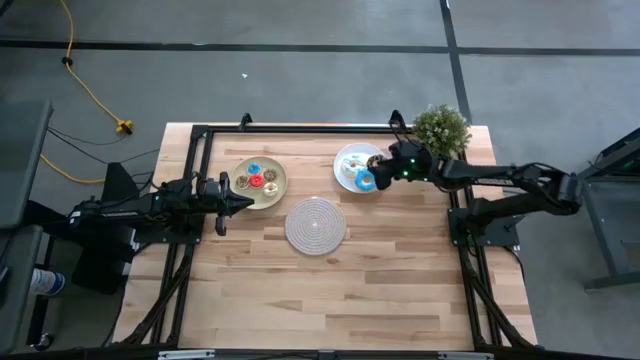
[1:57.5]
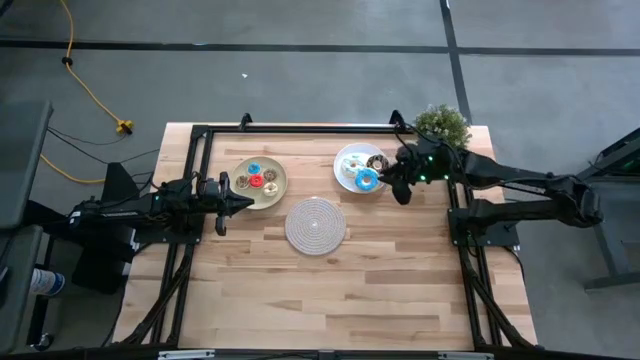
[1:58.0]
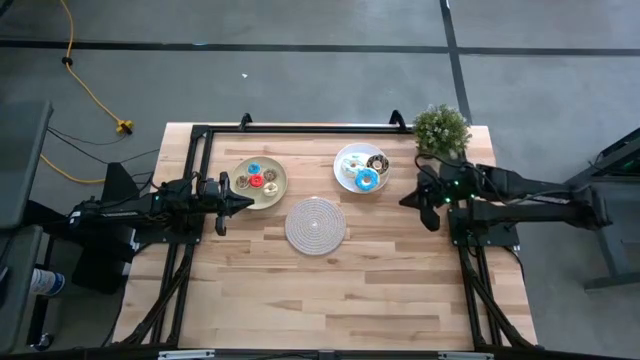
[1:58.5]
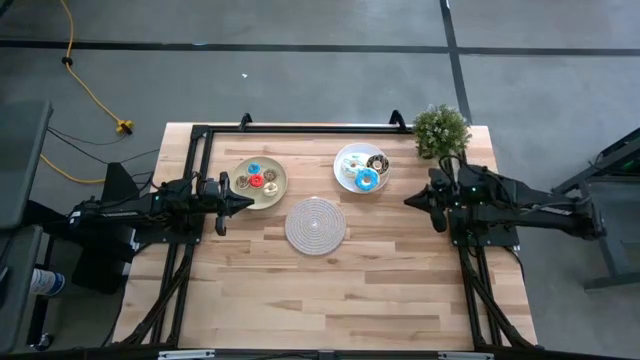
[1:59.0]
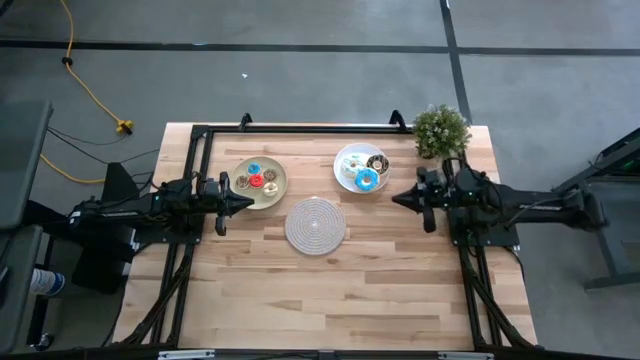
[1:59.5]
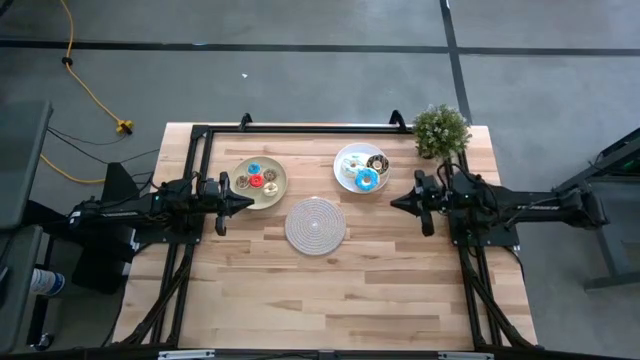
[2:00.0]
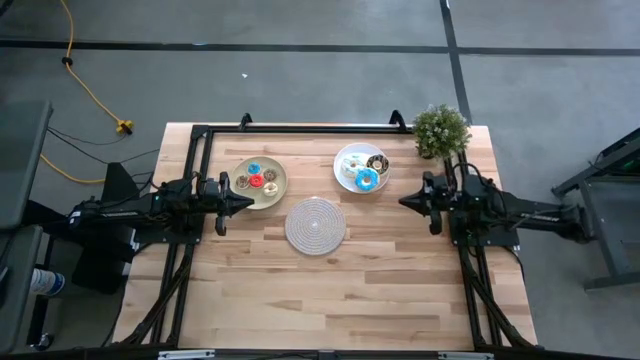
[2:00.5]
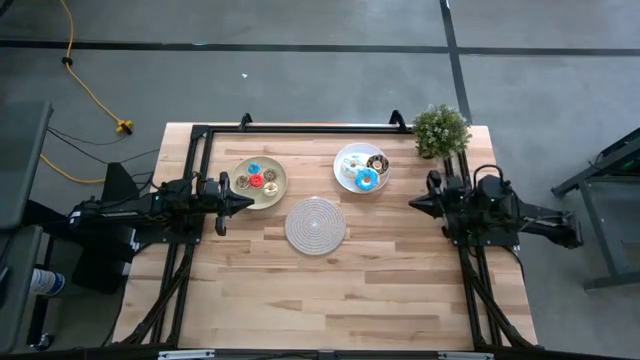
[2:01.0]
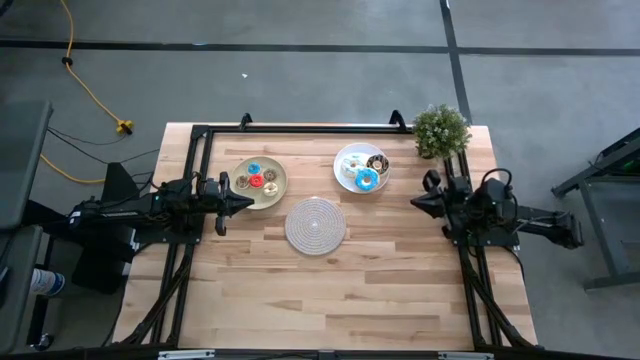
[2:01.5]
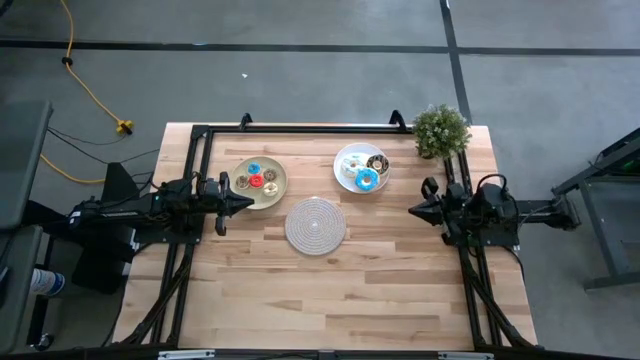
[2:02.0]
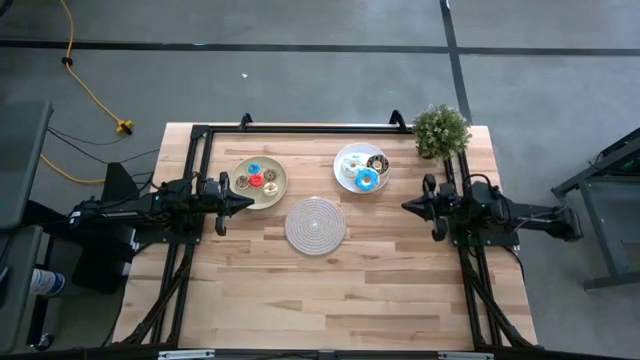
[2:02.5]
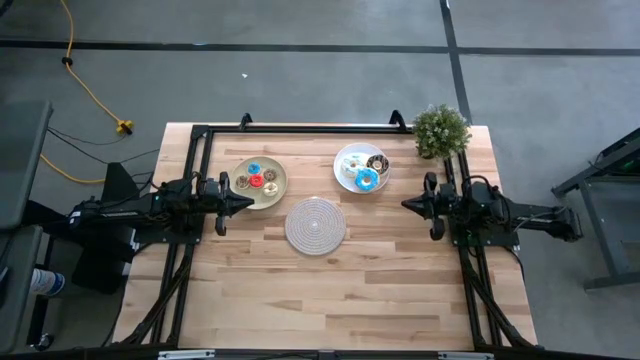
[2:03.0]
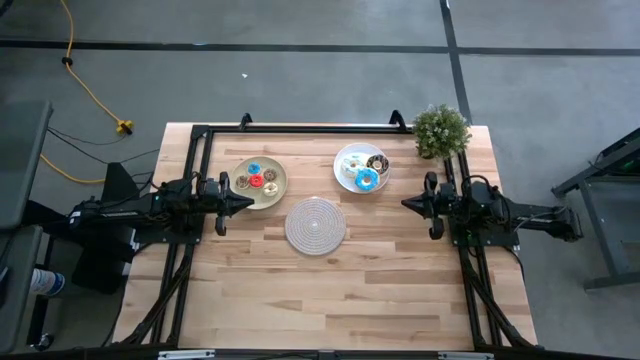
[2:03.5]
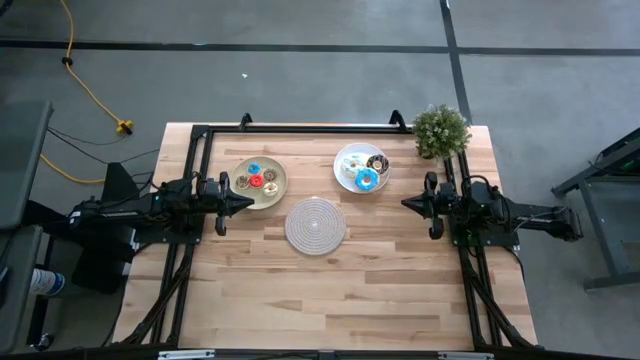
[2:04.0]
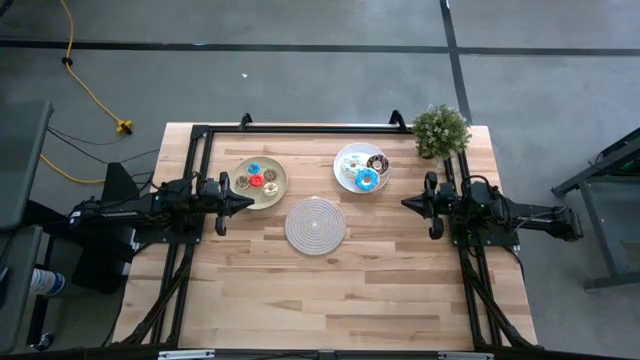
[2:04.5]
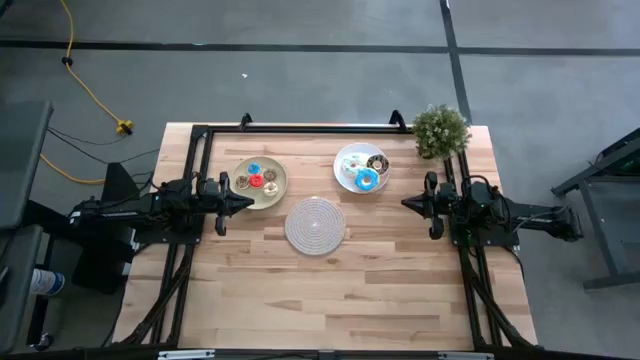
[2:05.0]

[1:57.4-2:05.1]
Task: Pick & Place donuts
Return to Home Position

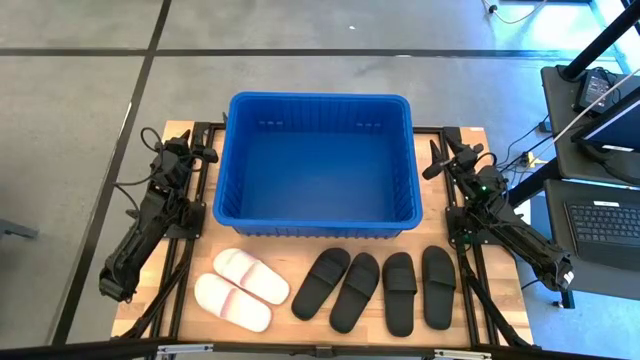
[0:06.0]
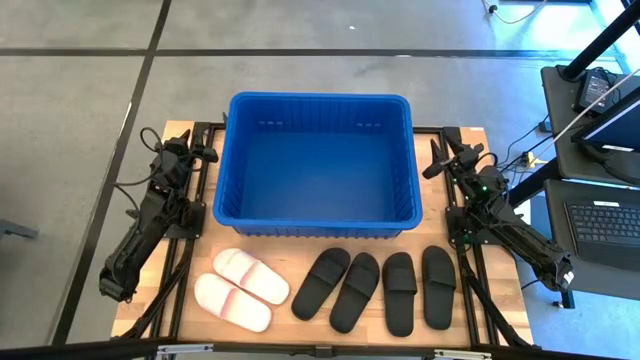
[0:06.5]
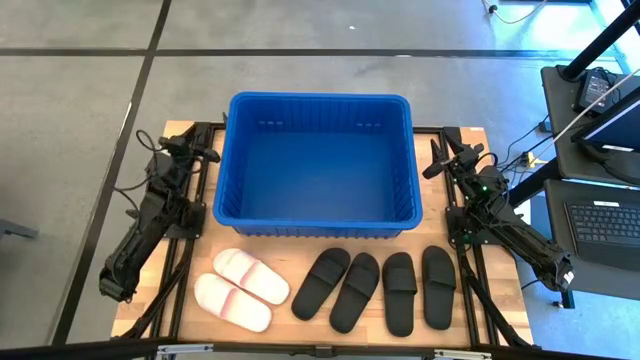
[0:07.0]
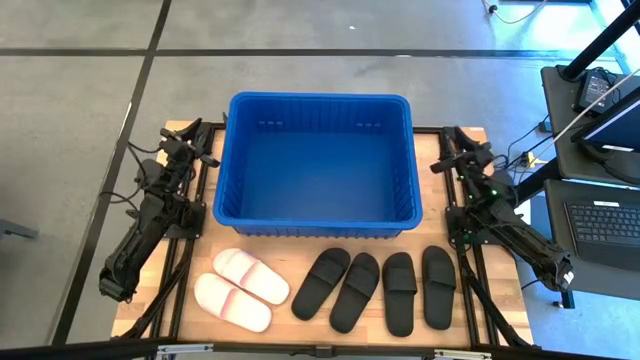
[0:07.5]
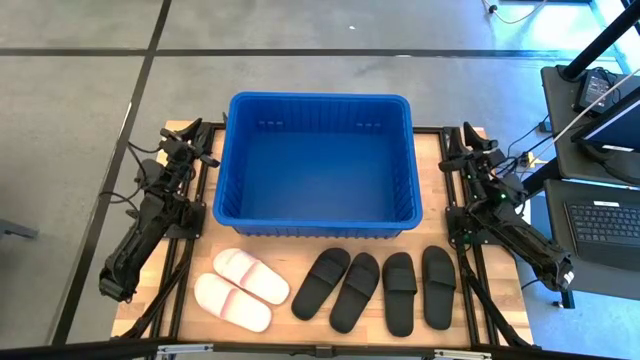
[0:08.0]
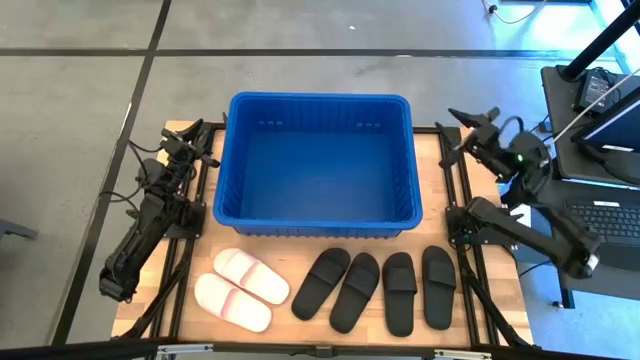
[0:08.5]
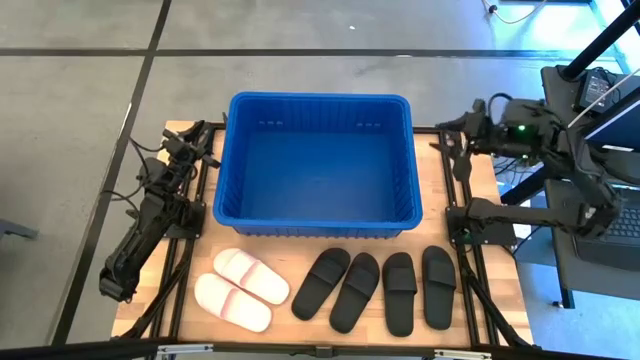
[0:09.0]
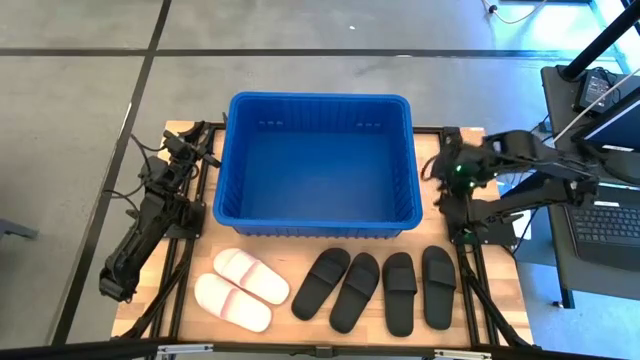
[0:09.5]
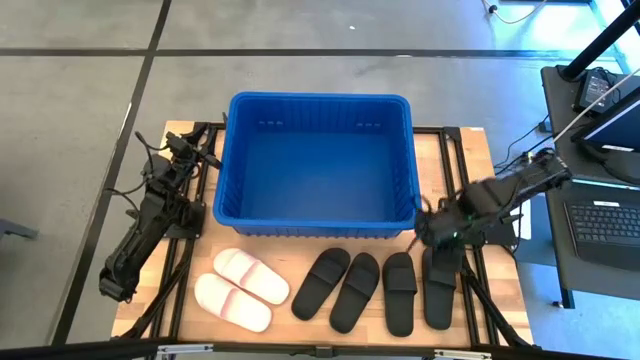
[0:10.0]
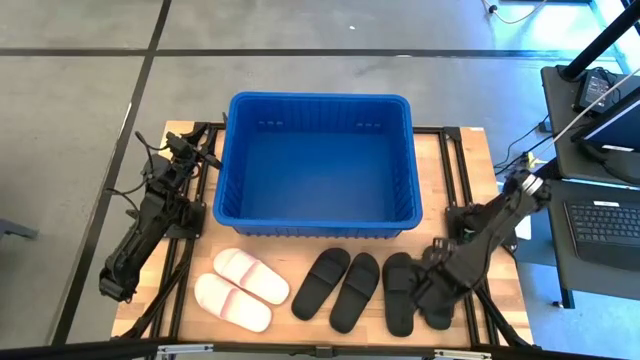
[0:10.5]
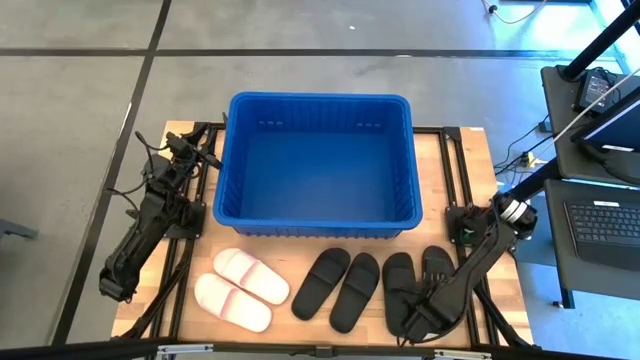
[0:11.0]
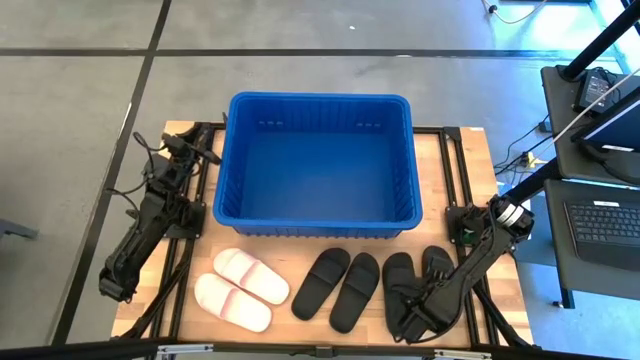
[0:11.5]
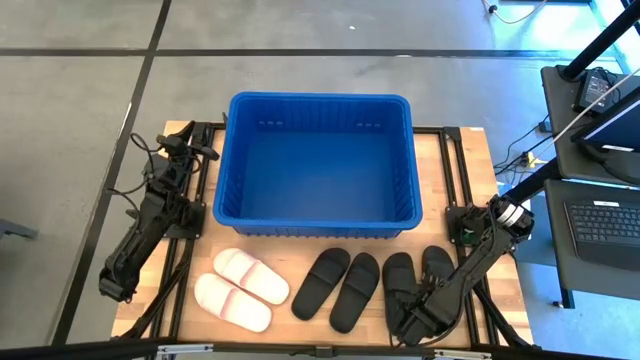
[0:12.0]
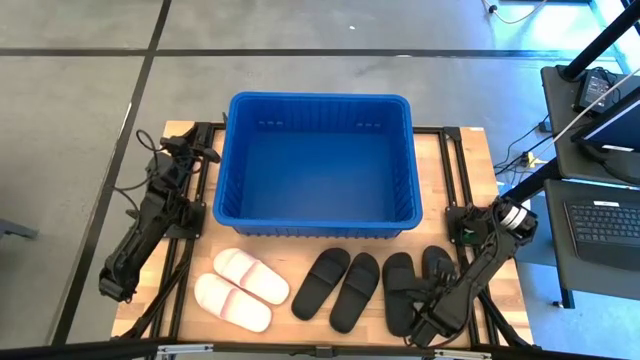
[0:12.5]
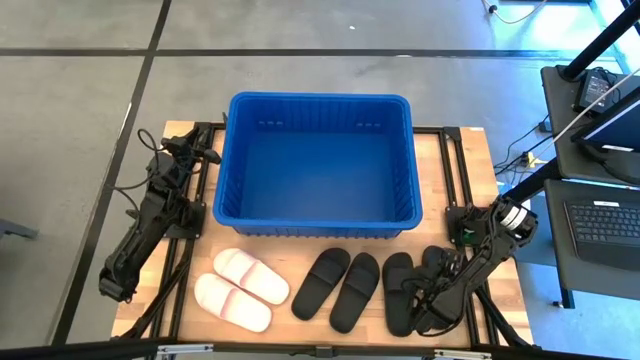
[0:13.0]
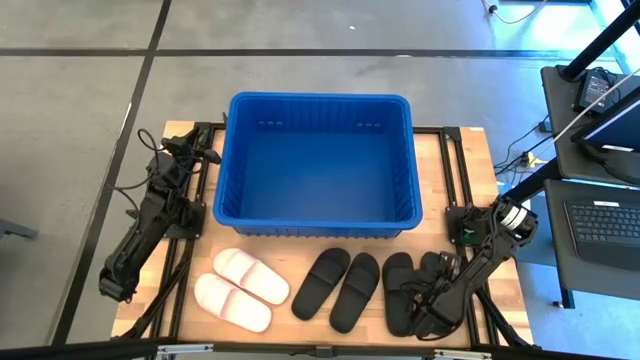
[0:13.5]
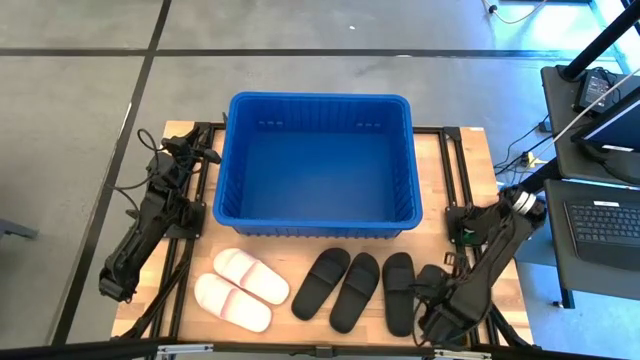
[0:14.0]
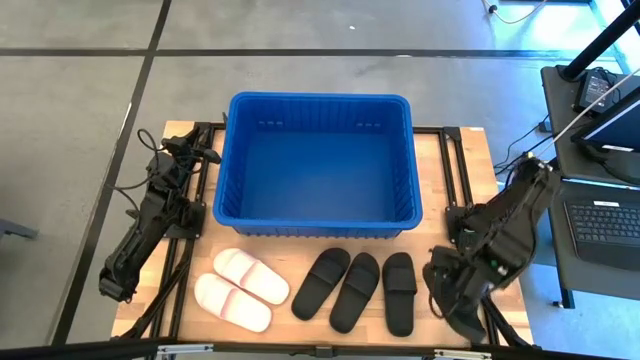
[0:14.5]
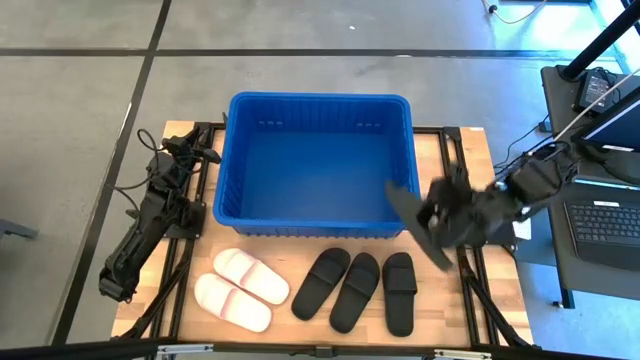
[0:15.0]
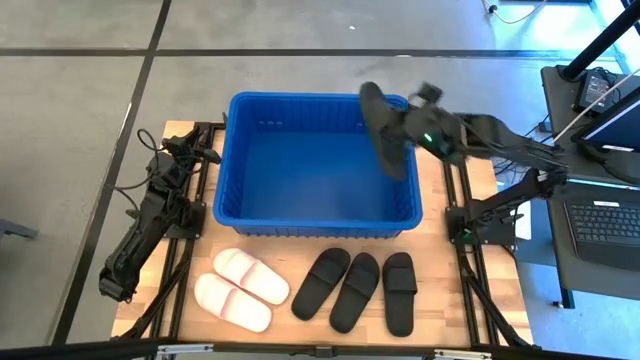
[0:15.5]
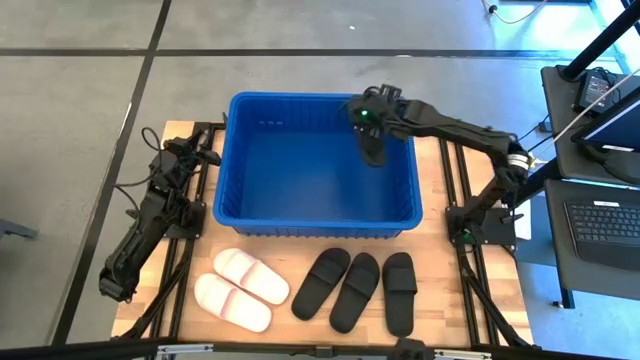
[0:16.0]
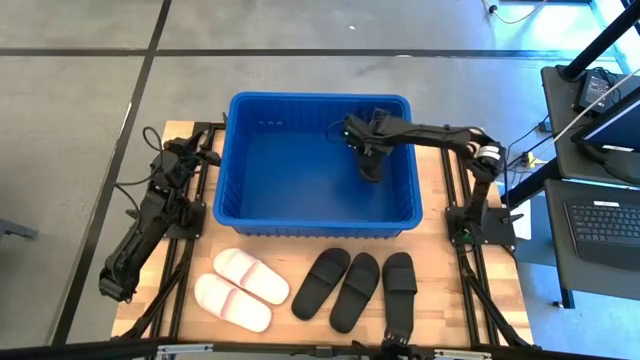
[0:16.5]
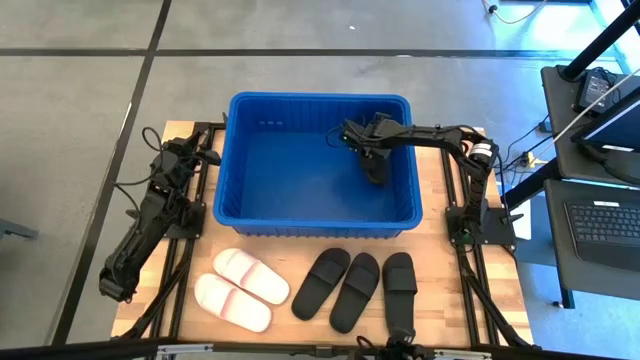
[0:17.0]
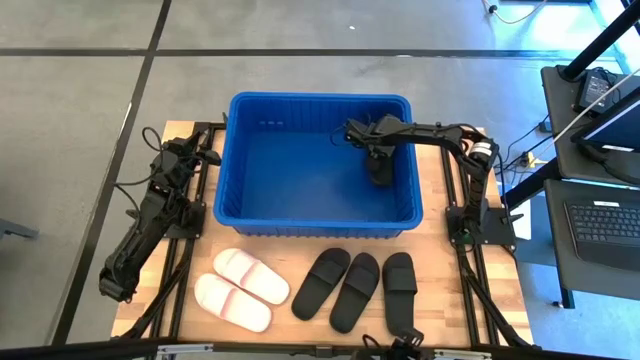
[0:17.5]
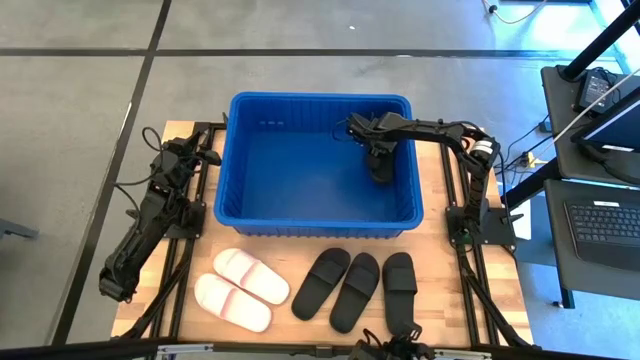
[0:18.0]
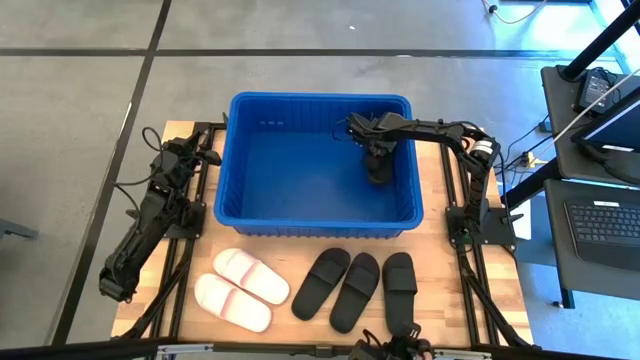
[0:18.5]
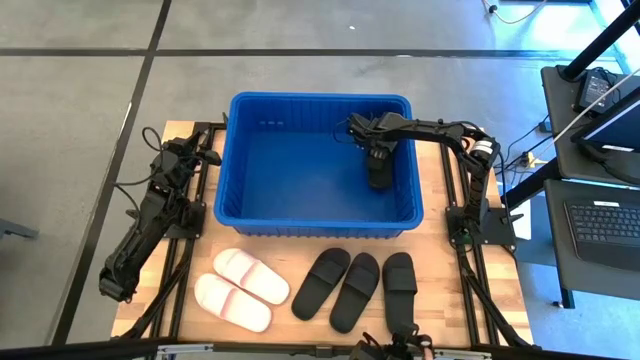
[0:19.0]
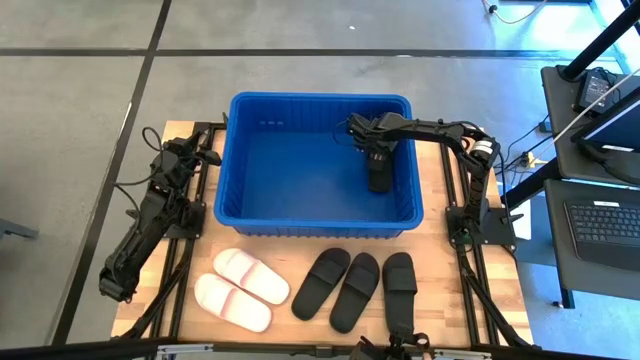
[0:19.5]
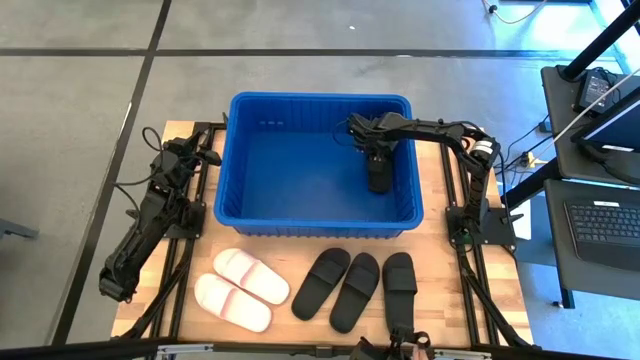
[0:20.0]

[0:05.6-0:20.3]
Task: Pick and place slides into bin
Put the black slide into the organizer bin
